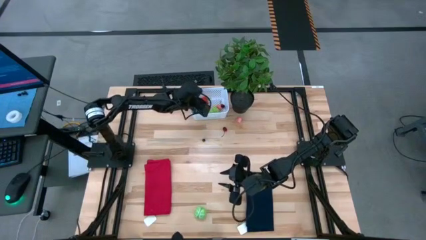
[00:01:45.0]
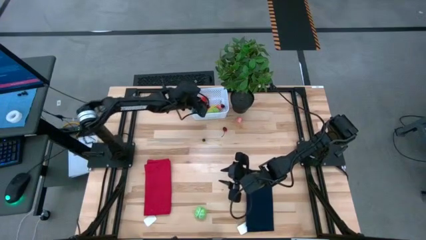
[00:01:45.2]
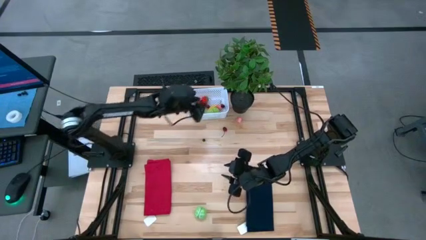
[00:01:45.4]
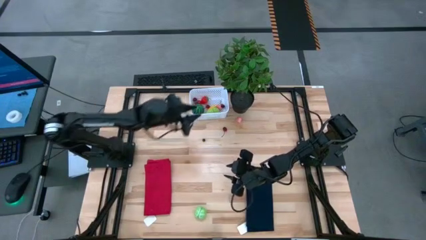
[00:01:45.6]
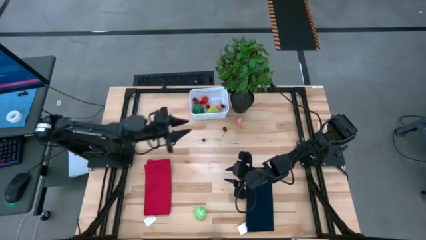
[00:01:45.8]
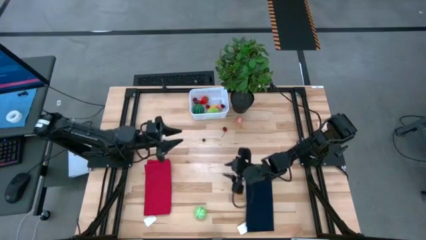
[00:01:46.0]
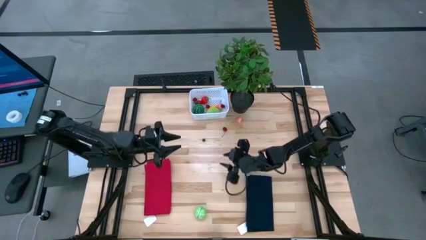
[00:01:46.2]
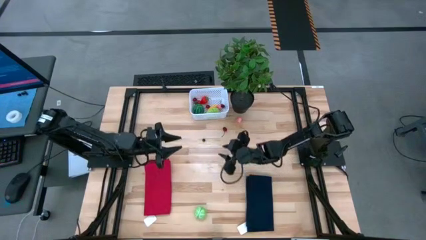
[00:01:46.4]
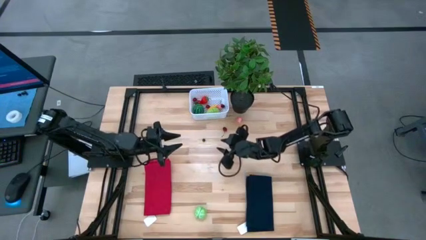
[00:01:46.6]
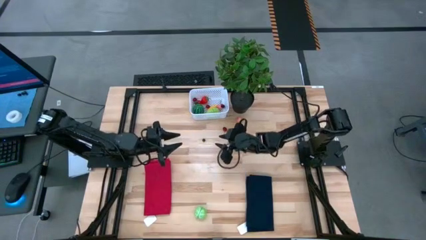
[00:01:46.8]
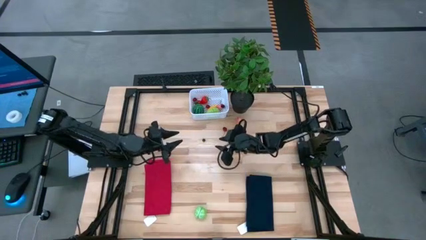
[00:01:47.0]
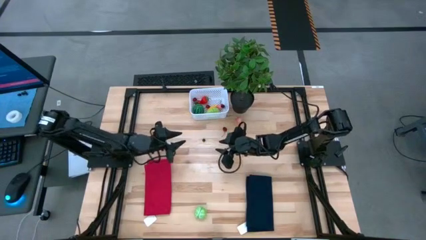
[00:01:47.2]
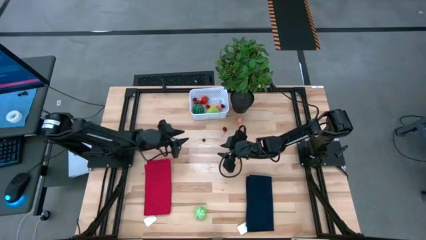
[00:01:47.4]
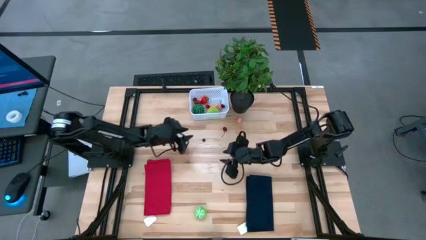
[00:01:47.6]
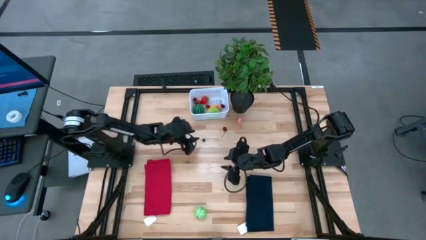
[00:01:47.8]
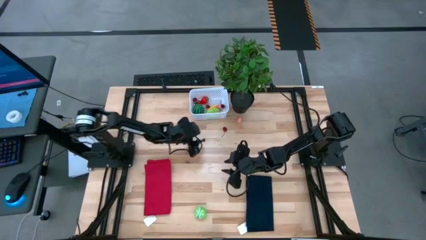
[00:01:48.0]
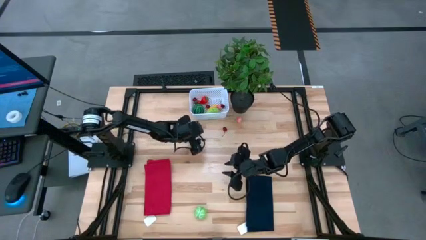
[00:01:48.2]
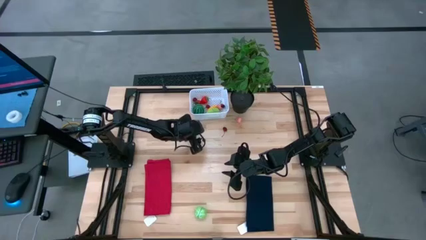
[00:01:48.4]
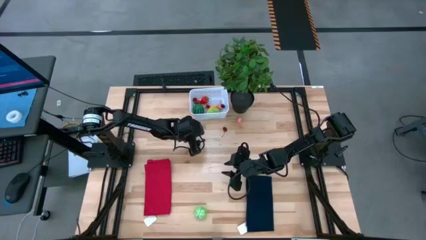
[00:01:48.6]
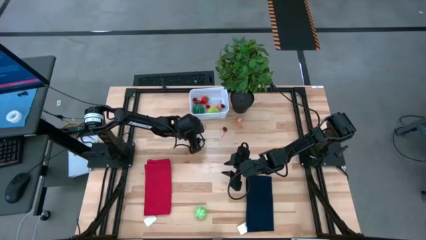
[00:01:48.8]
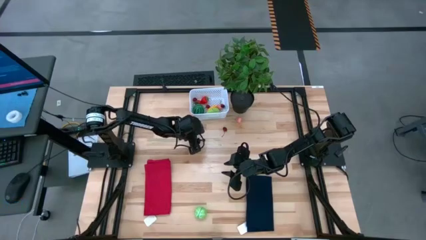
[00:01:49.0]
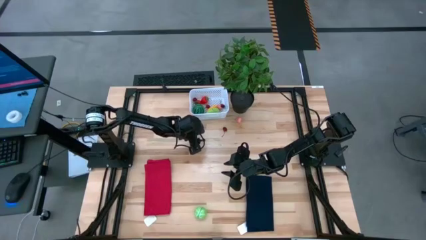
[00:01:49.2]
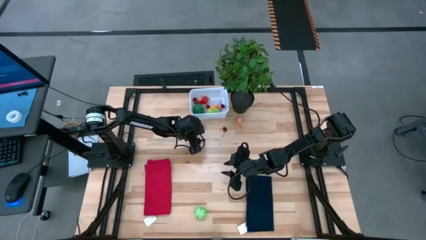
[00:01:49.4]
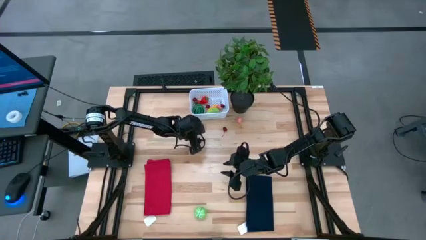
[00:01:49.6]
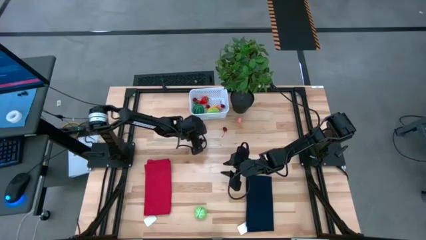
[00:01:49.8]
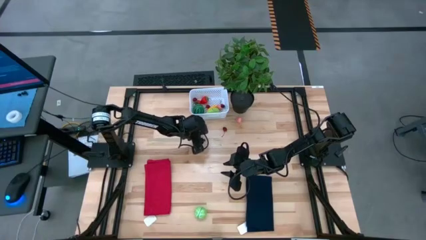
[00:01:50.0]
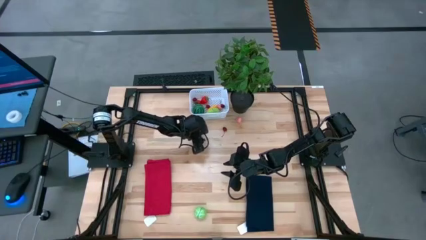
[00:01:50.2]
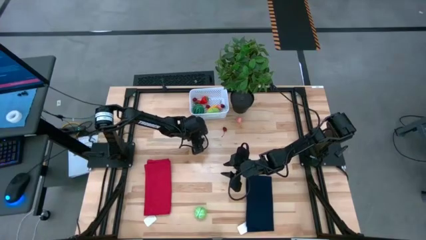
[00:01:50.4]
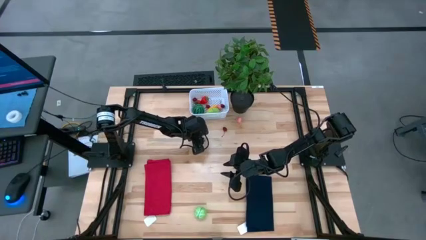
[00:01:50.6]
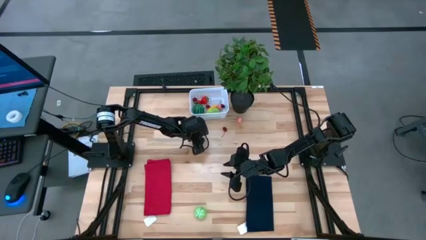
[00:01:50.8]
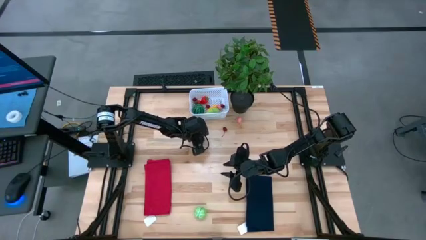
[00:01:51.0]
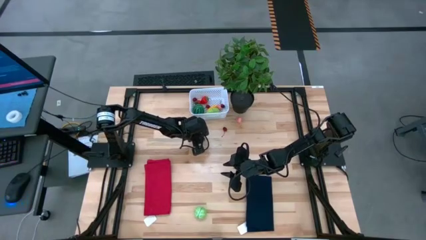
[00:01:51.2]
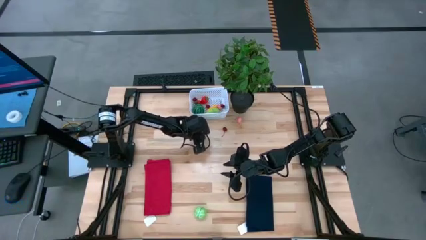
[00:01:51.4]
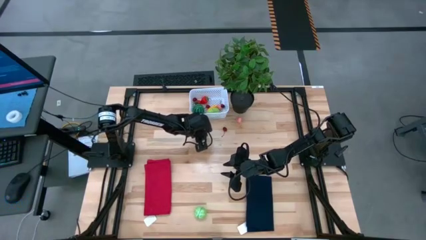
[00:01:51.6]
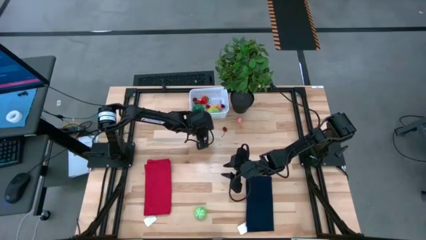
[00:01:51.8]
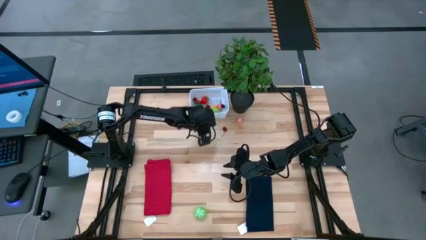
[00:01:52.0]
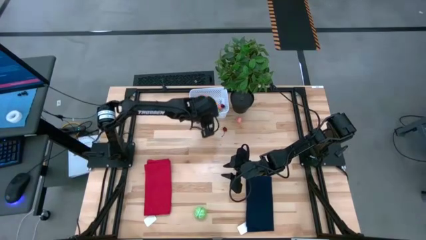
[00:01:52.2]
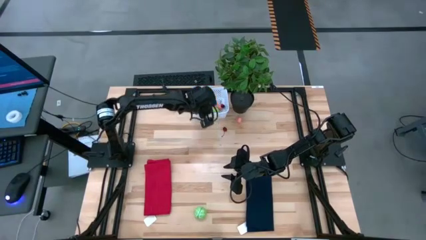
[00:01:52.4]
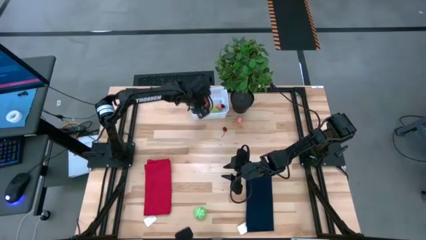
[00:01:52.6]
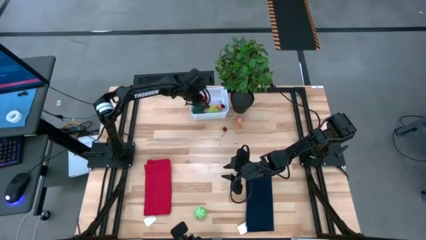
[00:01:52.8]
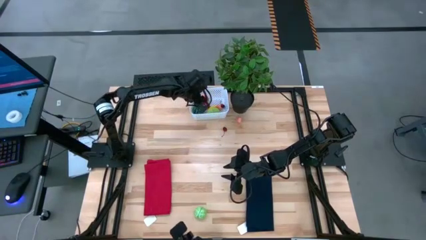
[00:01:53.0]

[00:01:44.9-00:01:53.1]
Task: Pick and placing Produce into tupperware
Put the blueberry into the white basket

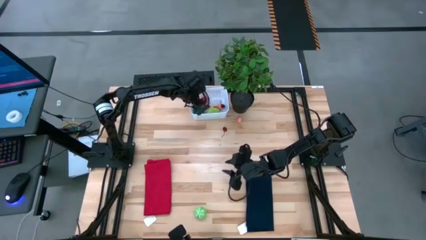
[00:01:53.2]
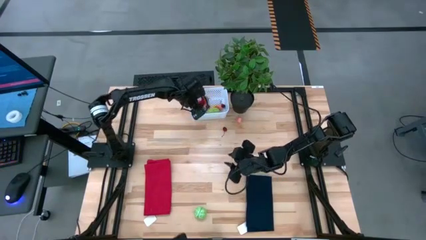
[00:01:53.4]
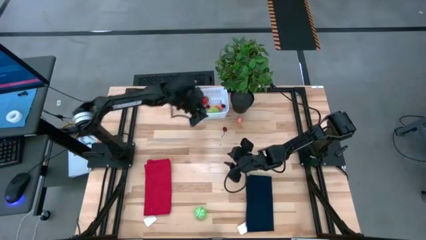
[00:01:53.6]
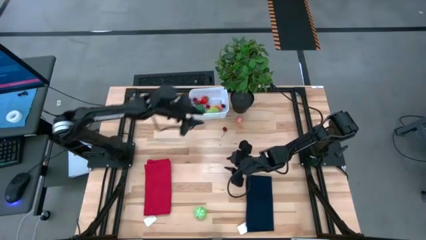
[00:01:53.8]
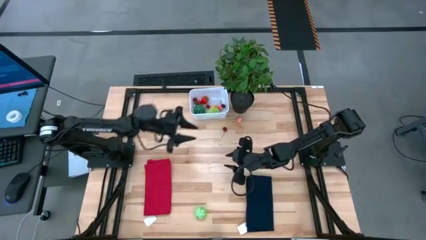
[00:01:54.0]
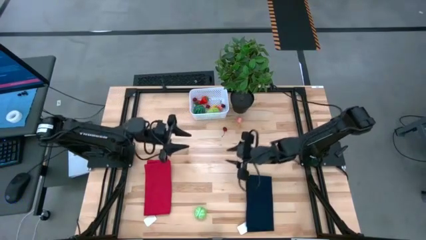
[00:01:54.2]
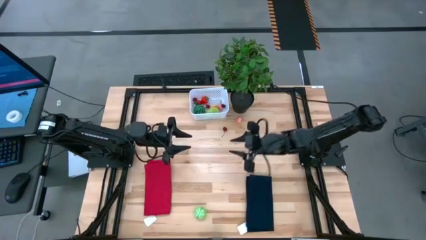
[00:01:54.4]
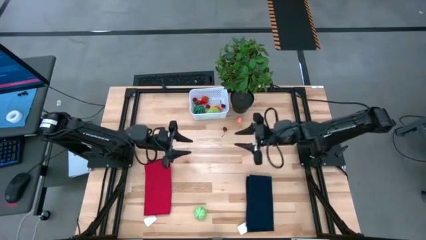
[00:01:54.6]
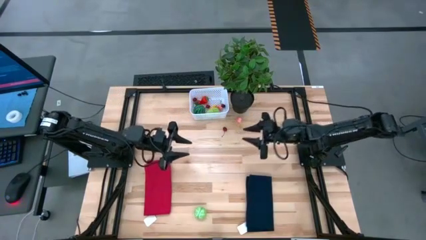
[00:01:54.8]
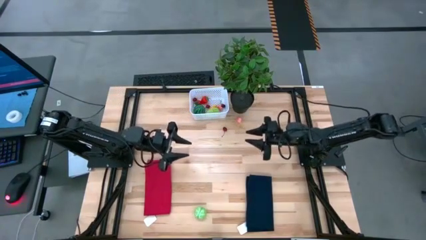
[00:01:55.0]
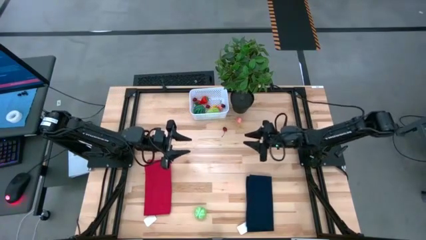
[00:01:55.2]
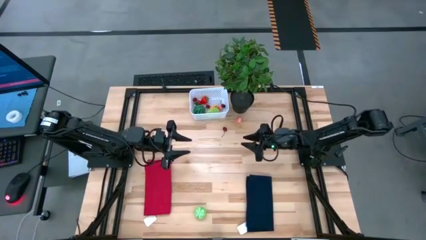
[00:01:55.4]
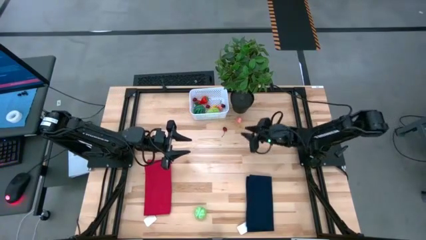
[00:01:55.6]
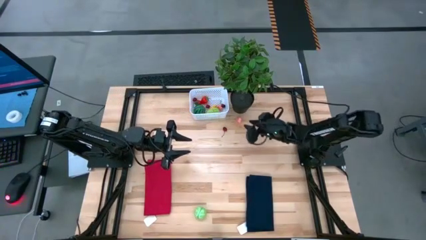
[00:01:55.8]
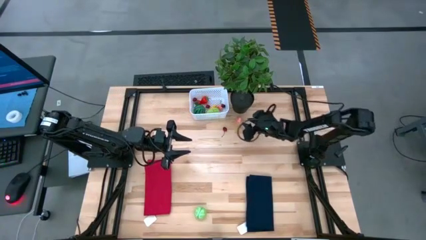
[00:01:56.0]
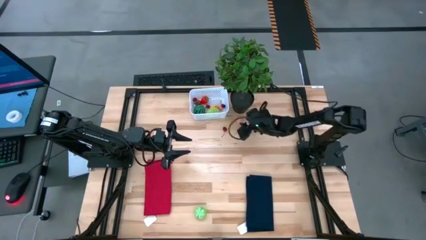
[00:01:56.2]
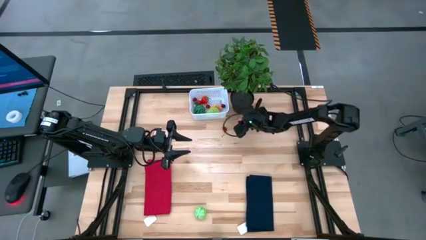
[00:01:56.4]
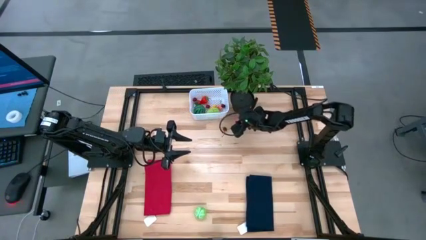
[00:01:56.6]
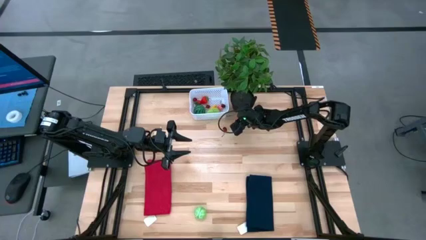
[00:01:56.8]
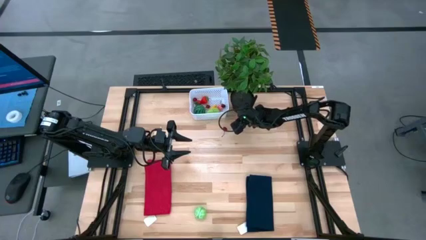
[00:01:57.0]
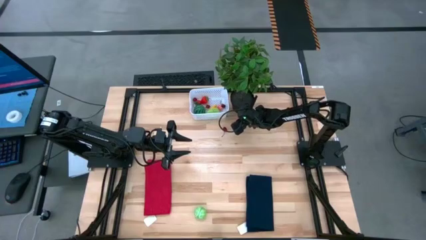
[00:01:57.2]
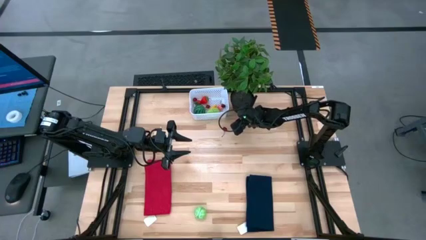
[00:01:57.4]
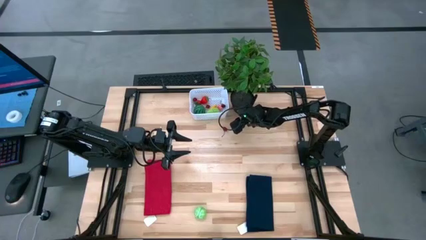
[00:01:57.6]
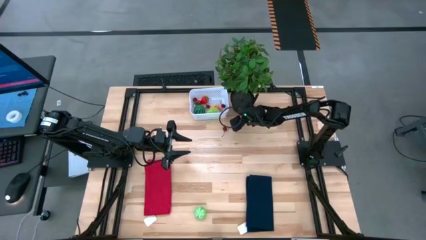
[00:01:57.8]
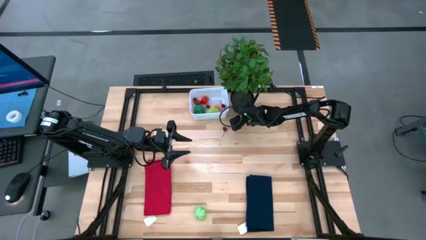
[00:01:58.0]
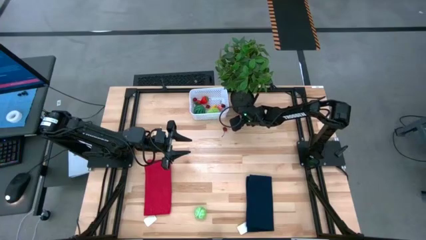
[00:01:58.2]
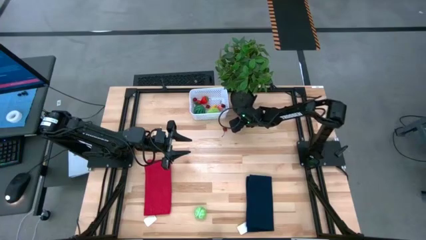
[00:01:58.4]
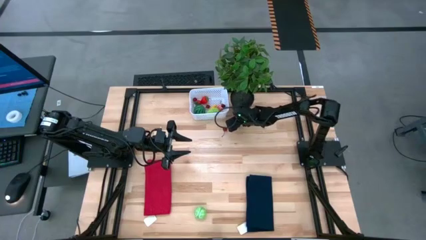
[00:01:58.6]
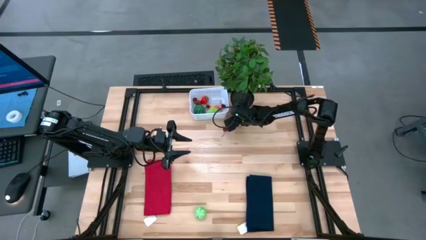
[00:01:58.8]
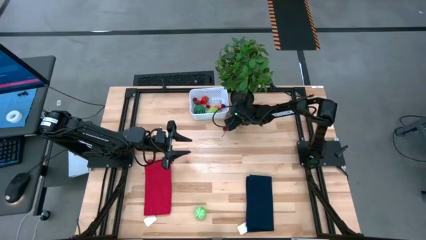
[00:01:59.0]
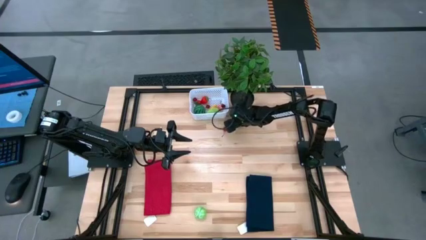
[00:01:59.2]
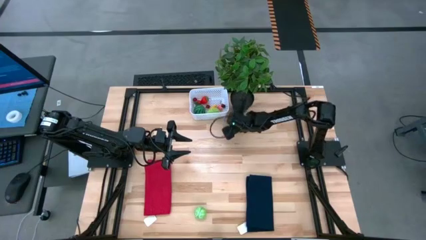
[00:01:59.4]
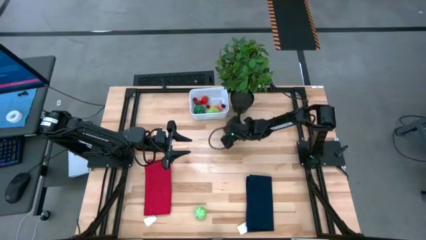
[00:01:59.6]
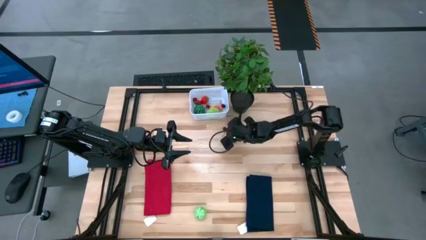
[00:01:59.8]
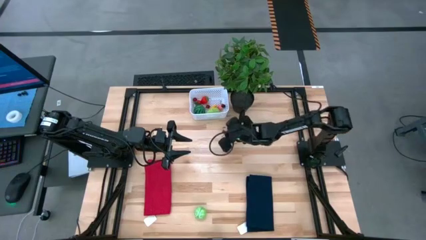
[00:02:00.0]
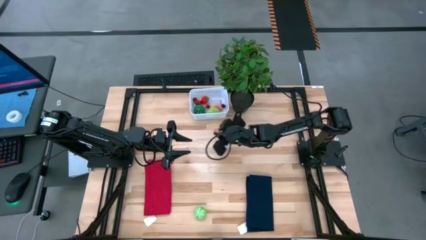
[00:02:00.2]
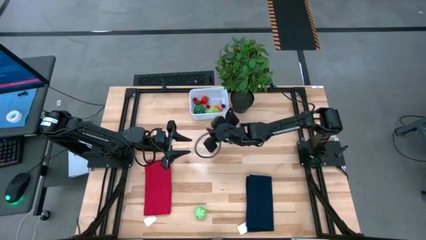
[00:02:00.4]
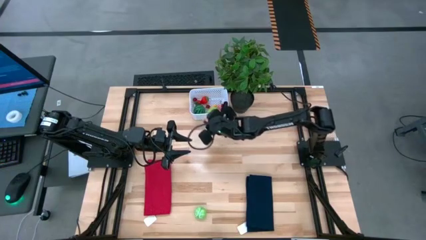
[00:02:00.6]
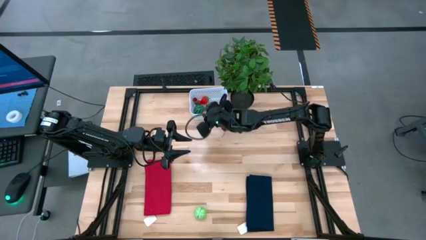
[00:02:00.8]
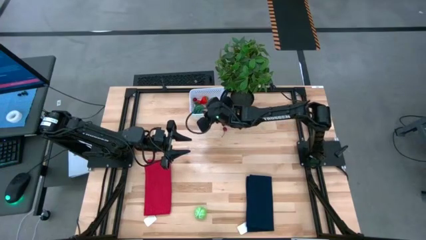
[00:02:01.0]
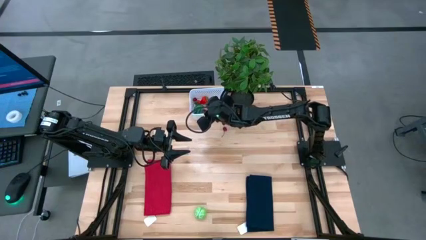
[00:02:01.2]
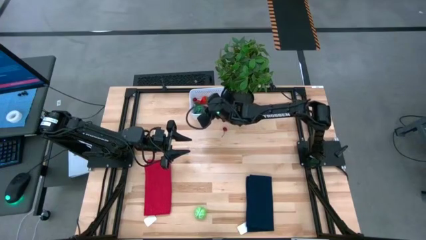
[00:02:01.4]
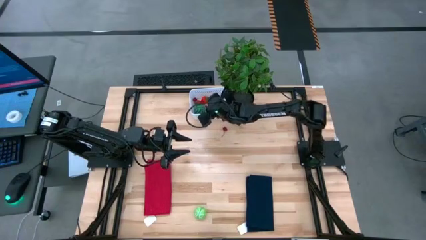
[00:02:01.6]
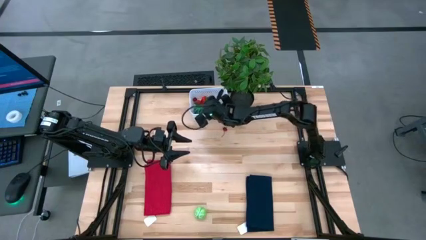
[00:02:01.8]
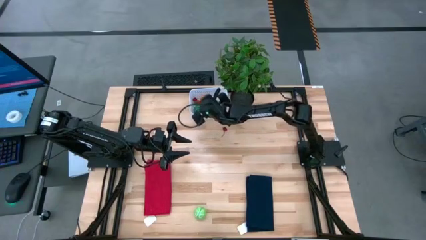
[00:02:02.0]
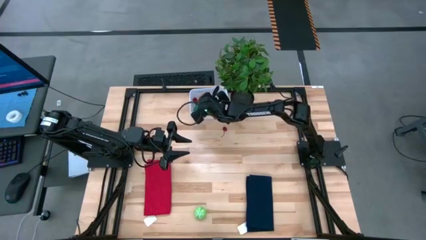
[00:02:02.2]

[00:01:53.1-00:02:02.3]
Put the peach into the white basket

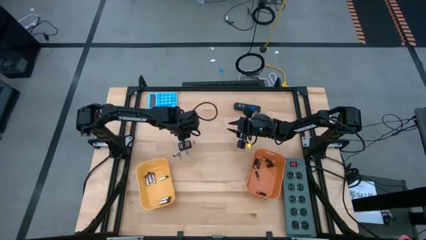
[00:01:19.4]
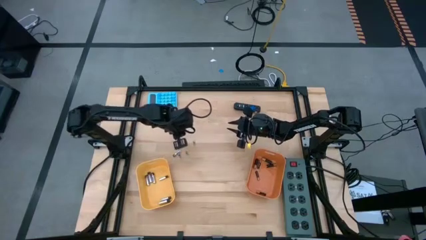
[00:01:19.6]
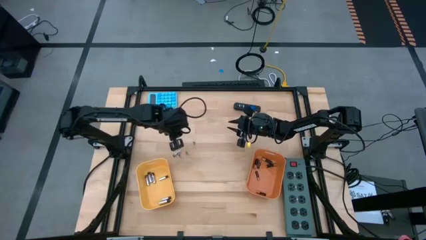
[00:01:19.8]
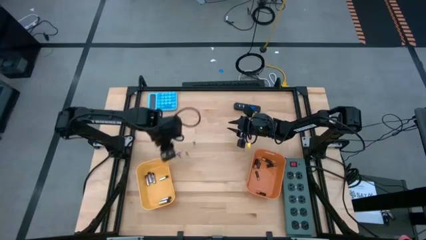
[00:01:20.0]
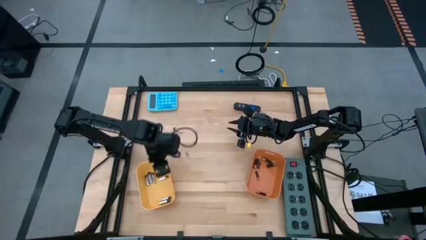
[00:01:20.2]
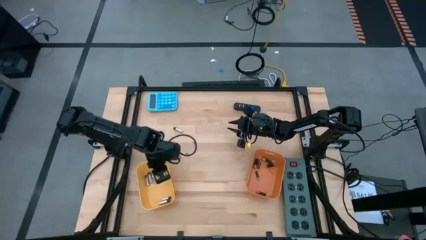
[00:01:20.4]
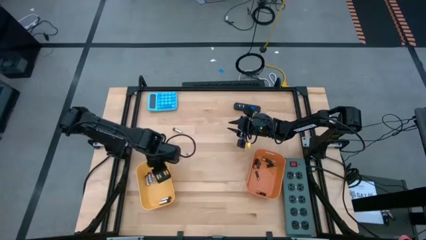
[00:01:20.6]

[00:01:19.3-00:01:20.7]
Task: Sort batteries
Put the silver battery into the yellow bin
